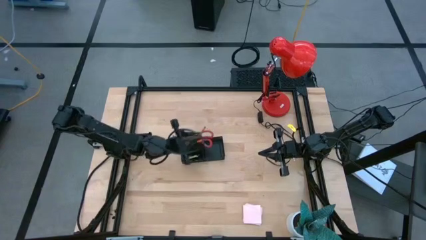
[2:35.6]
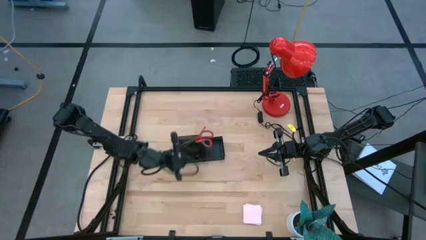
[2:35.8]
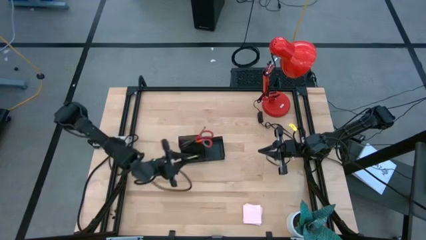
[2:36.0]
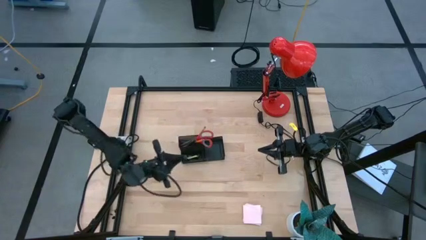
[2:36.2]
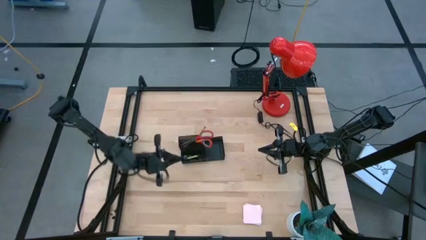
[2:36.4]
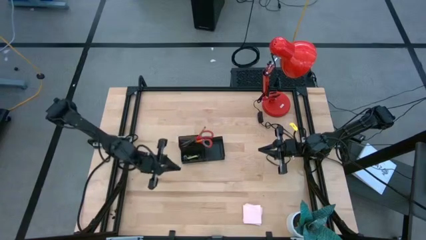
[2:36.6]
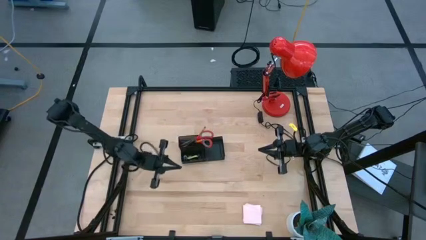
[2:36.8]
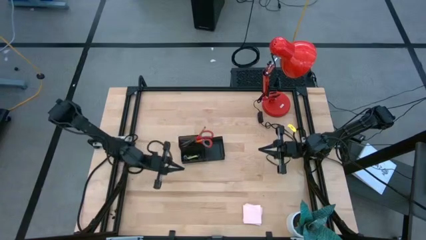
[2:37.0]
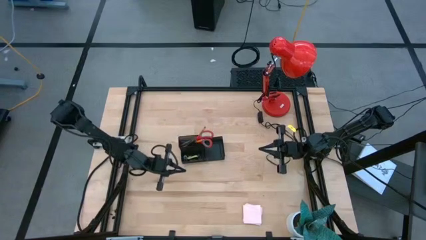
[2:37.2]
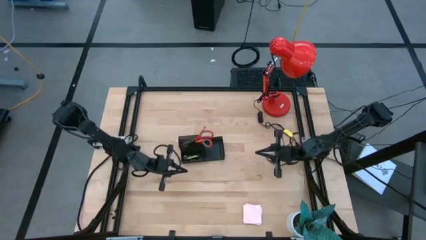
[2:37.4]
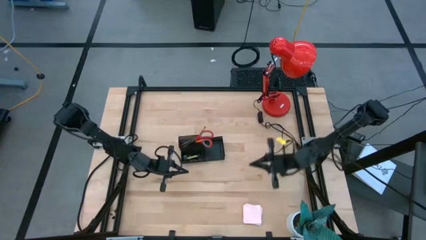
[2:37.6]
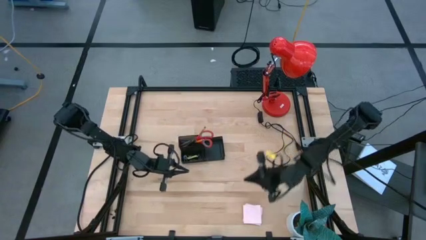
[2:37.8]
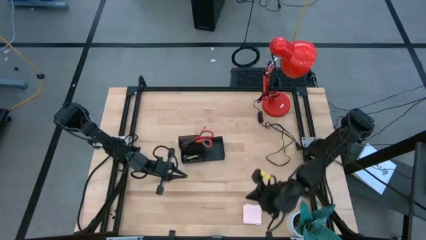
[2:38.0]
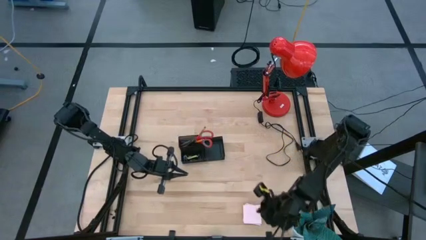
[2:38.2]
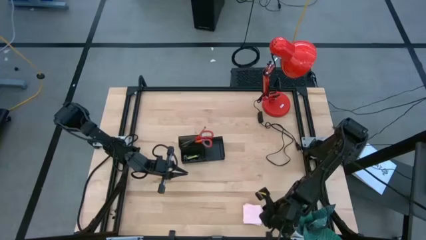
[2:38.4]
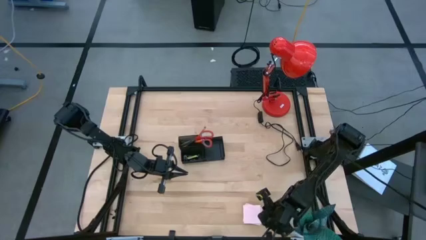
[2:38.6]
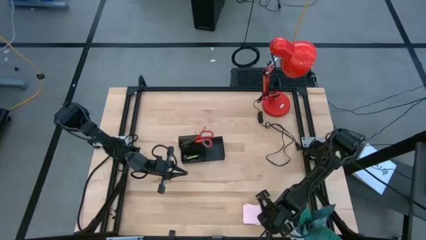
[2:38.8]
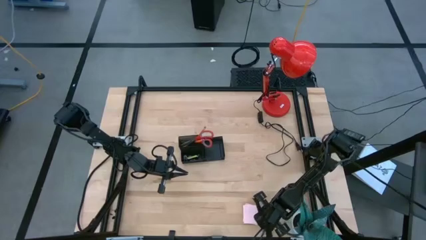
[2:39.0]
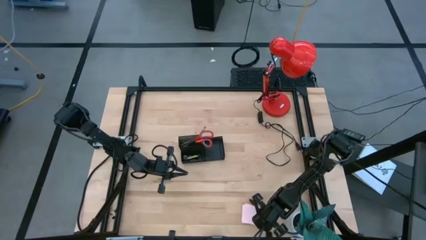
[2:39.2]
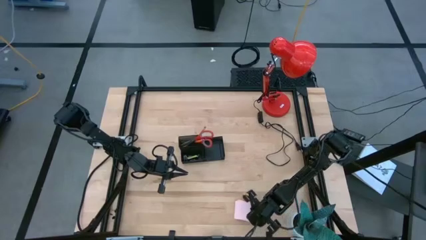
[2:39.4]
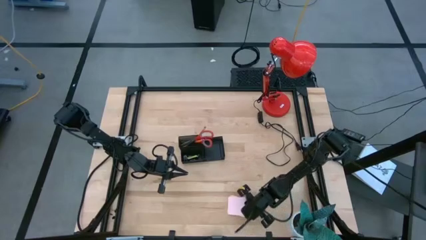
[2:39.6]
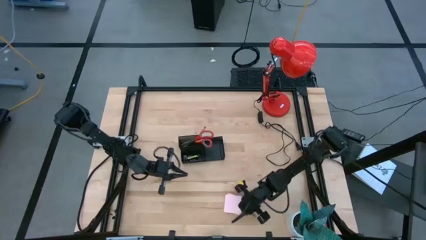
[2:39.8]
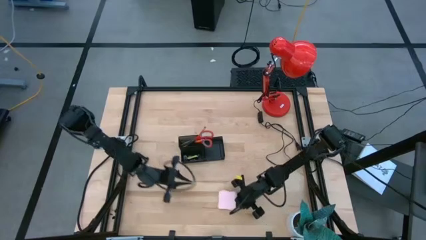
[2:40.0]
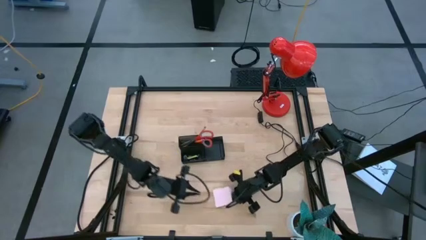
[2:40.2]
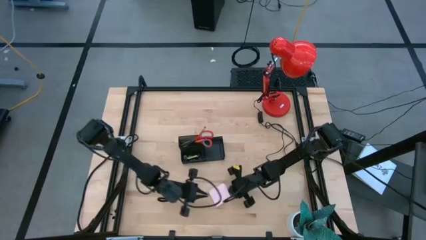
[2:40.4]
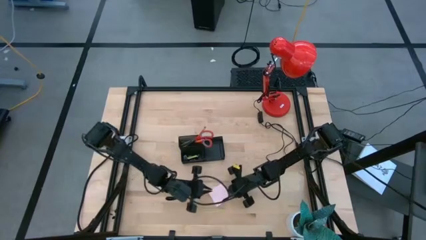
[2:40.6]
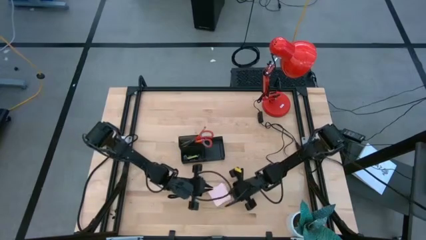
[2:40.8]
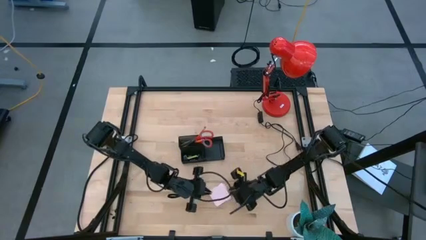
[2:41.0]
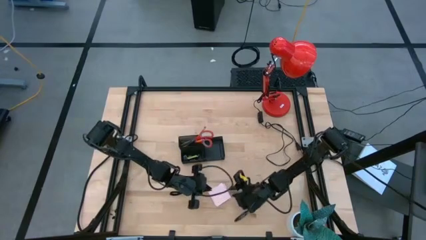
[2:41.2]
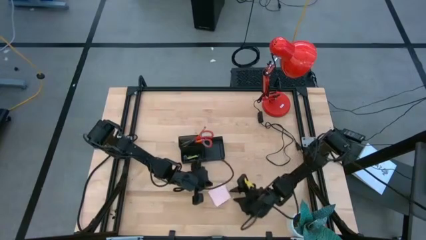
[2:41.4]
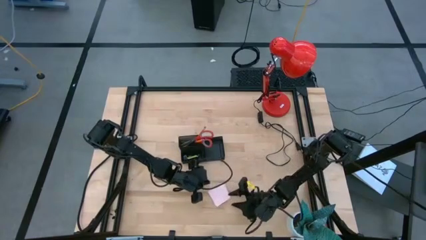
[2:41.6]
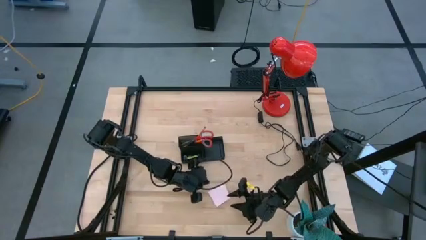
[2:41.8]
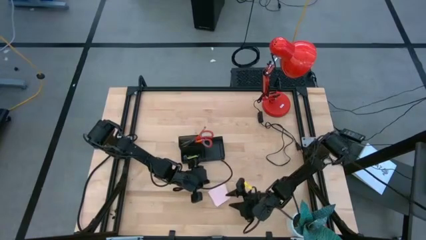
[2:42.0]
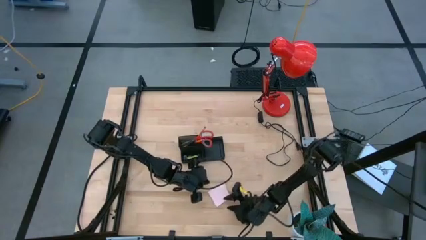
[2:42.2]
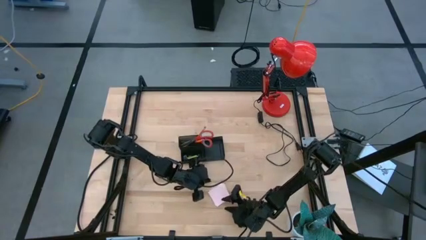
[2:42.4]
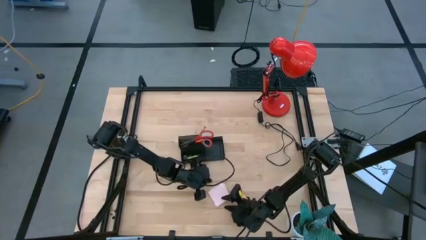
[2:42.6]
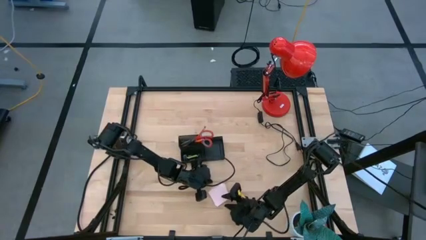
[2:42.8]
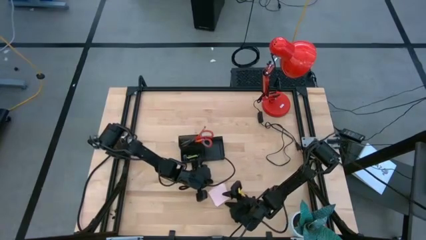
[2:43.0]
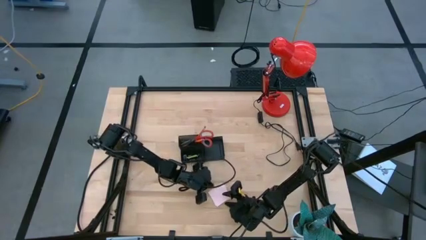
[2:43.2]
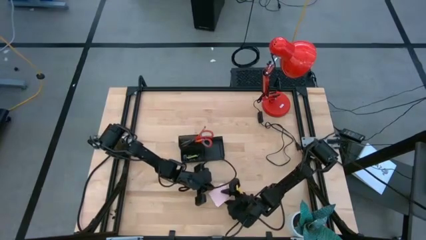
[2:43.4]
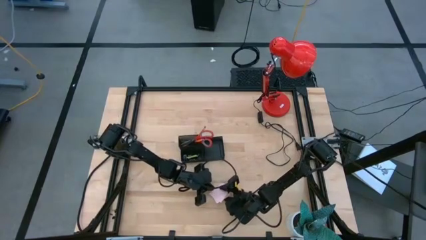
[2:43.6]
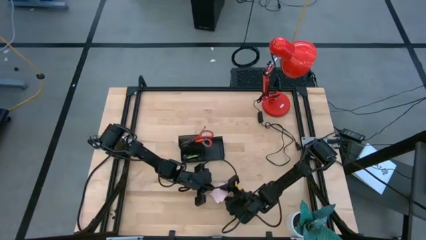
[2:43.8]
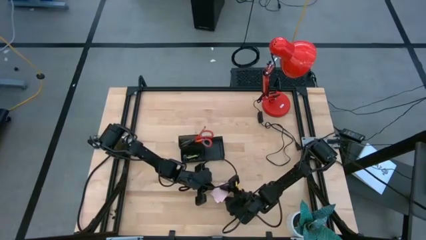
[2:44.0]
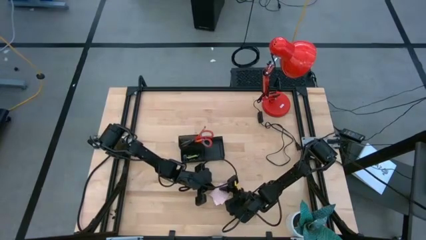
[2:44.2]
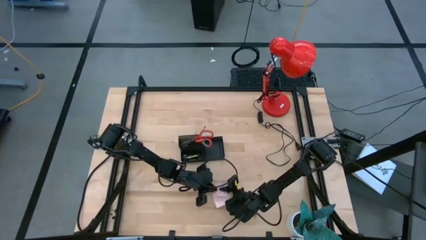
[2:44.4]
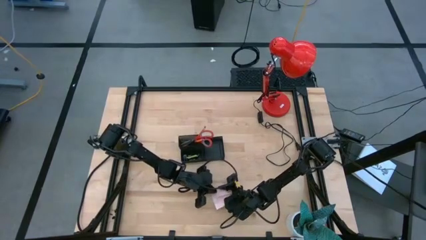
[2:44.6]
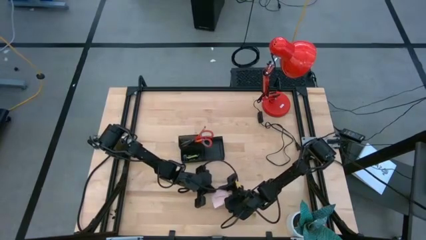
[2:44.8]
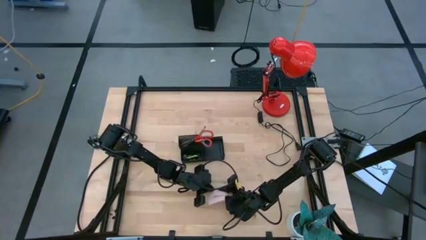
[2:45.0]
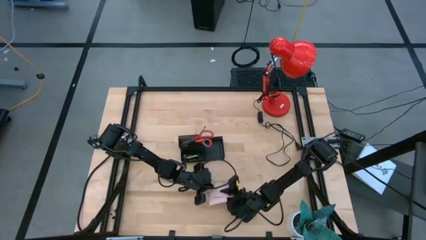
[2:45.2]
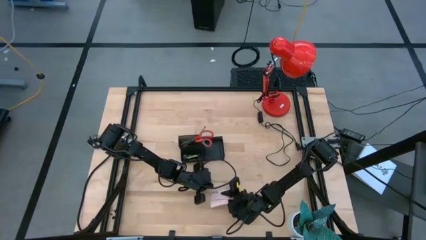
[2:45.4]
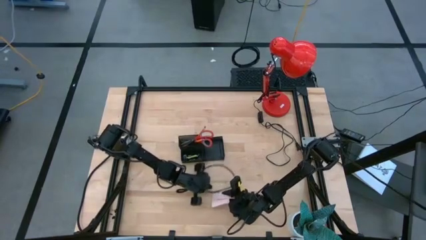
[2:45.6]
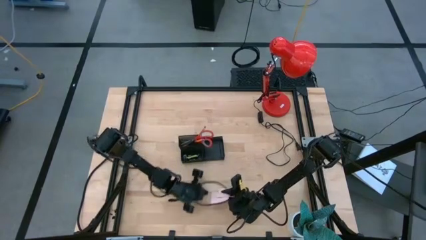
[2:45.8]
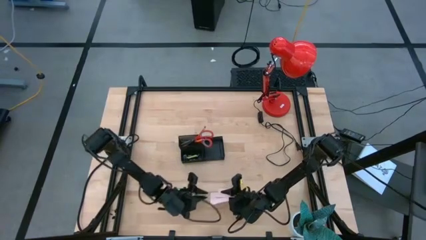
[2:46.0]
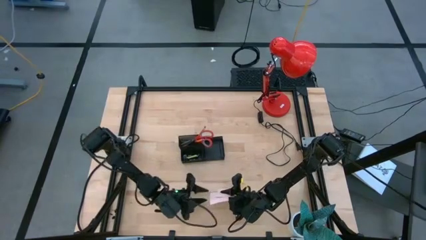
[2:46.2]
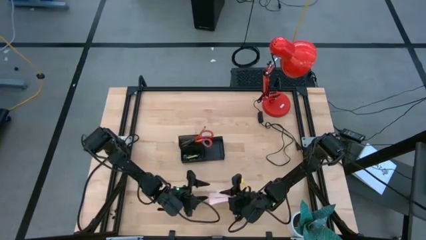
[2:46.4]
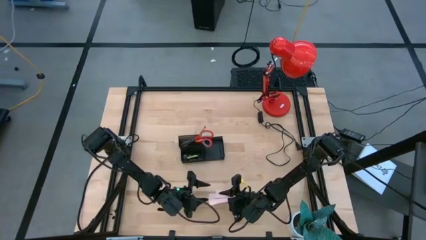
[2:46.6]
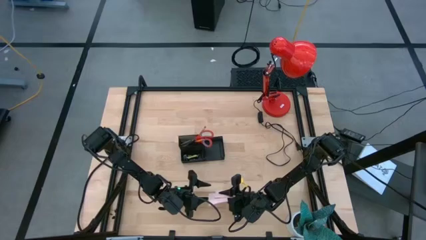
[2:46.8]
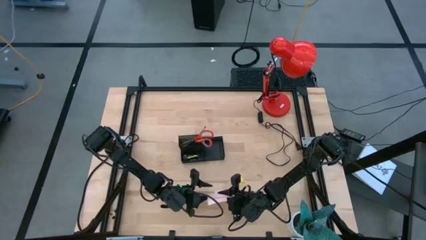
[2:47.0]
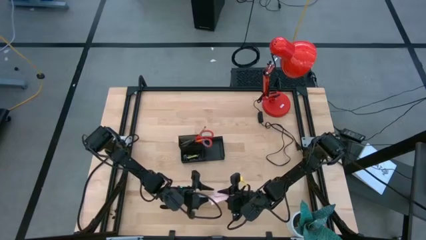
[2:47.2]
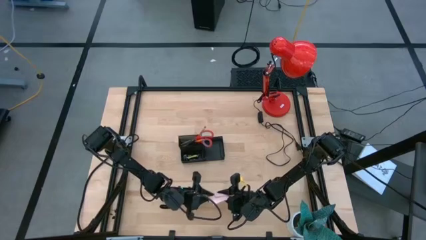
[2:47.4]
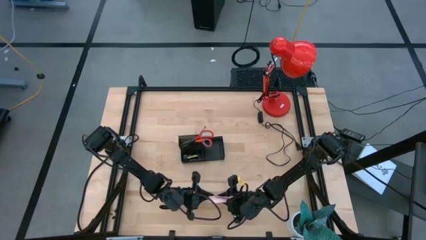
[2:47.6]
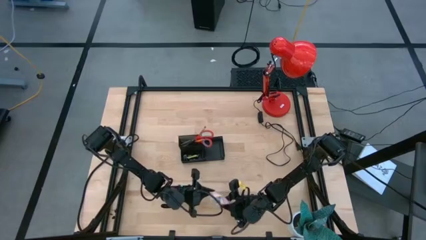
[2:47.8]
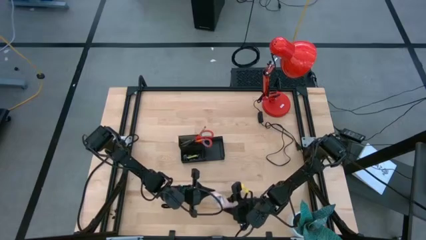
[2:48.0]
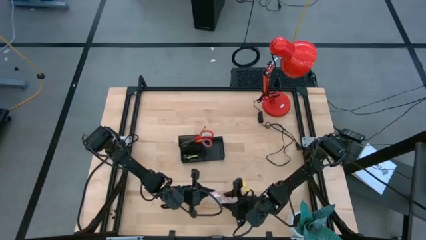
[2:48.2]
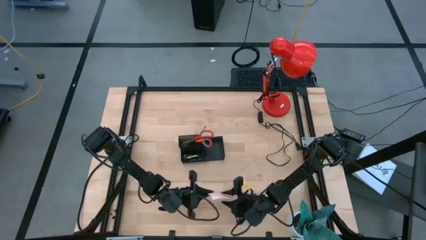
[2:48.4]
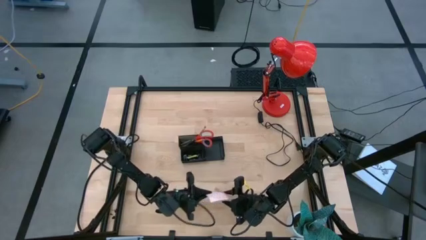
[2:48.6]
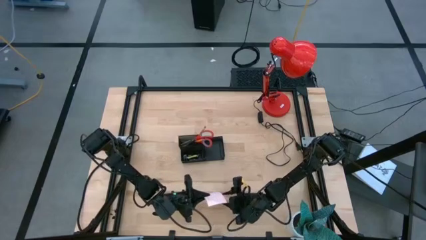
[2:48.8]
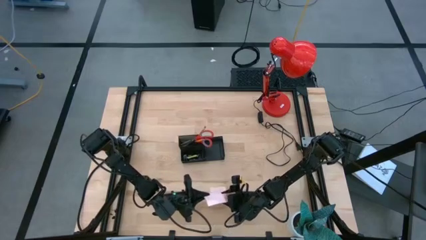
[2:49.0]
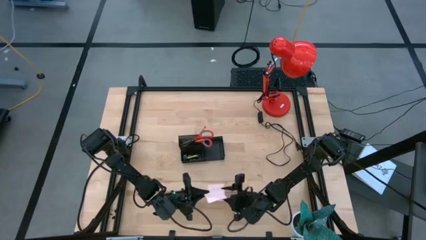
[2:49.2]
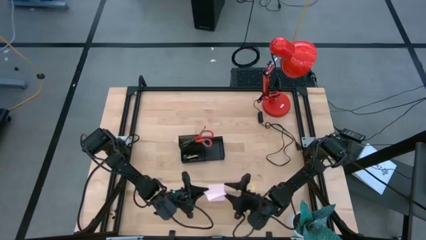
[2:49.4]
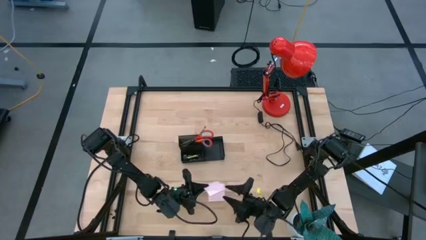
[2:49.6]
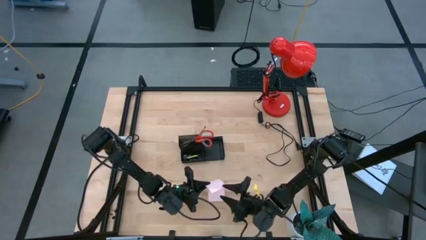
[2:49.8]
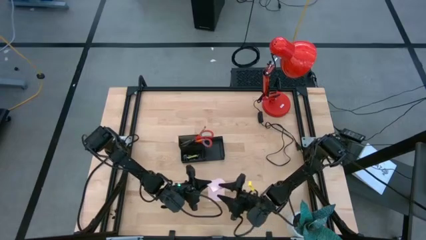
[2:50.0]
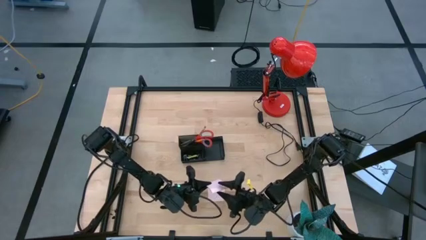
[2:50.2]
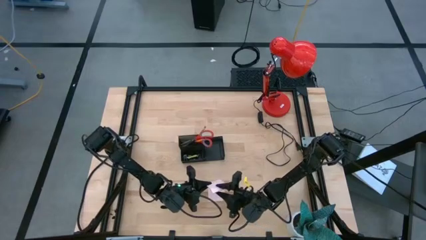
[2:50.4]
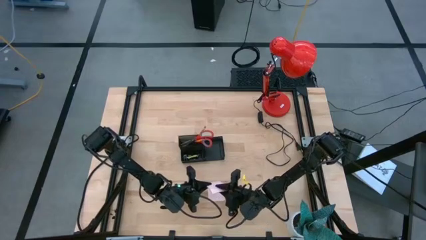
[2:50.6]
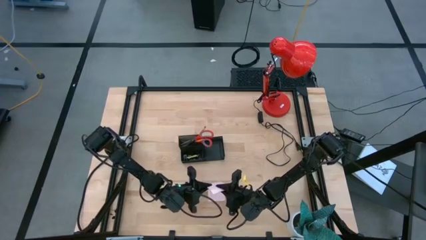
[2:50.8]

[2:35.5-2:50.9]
Task: Pick and place office supplies into organizer
Put the pink sticky note into the mesh desk organizer
